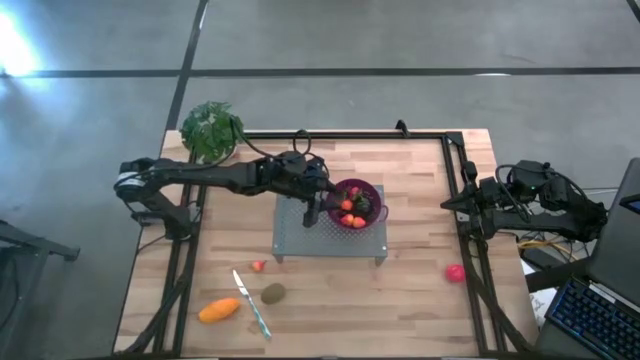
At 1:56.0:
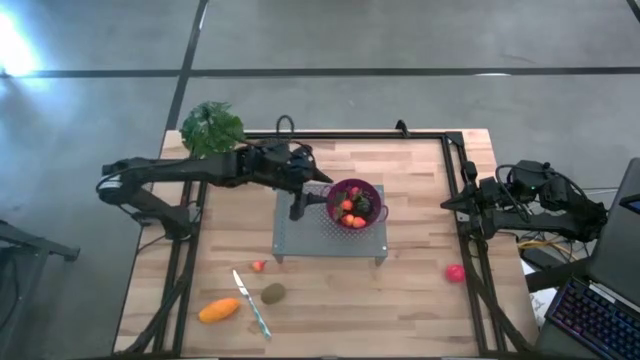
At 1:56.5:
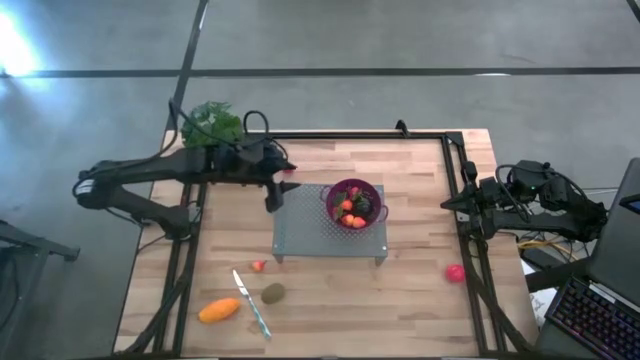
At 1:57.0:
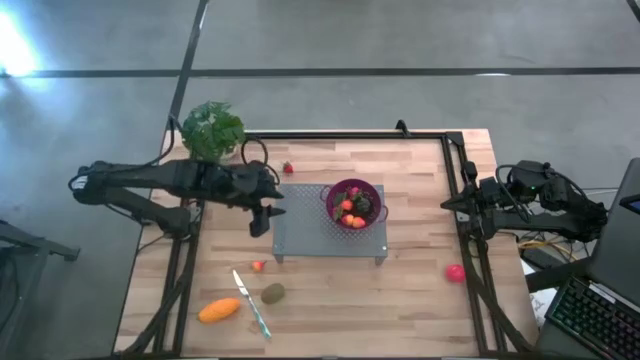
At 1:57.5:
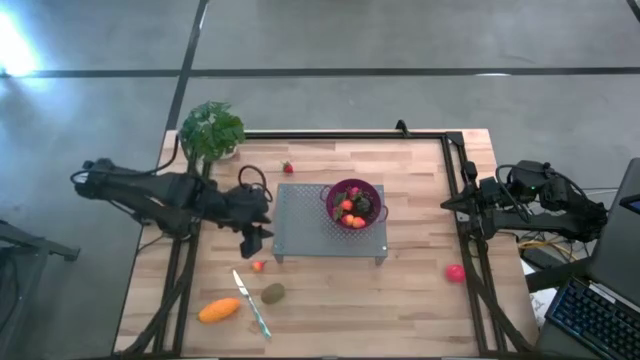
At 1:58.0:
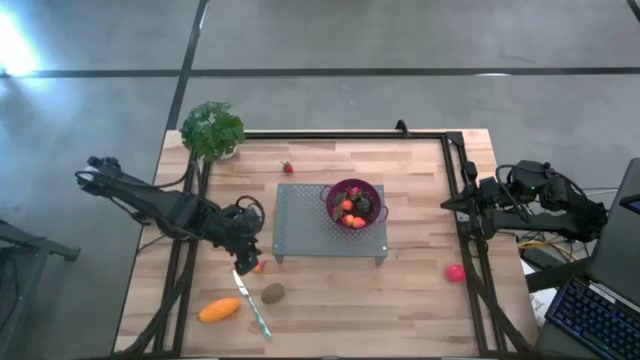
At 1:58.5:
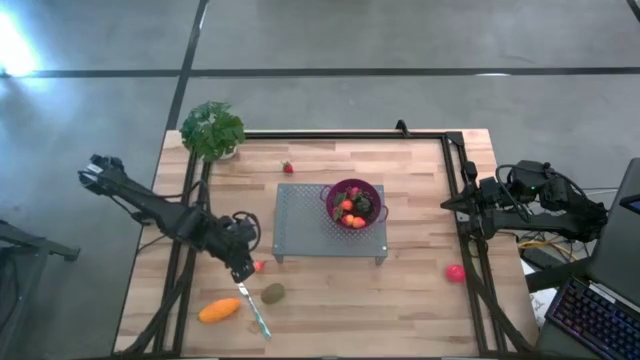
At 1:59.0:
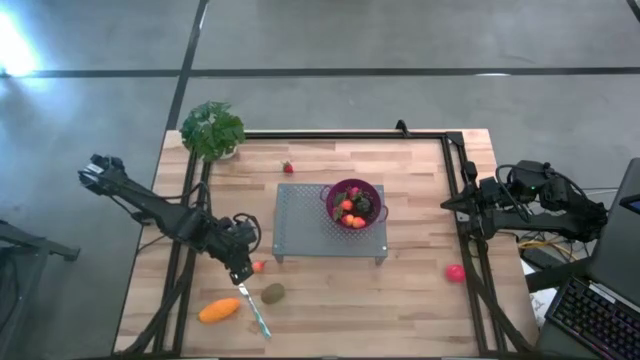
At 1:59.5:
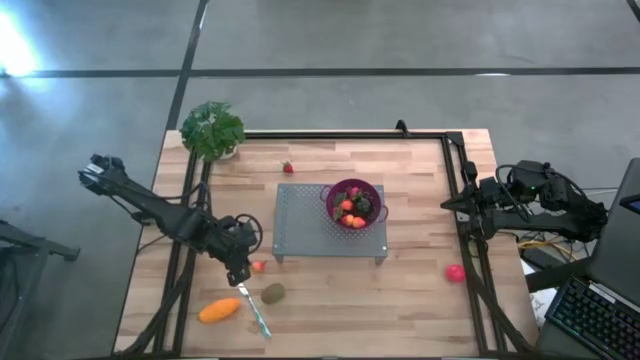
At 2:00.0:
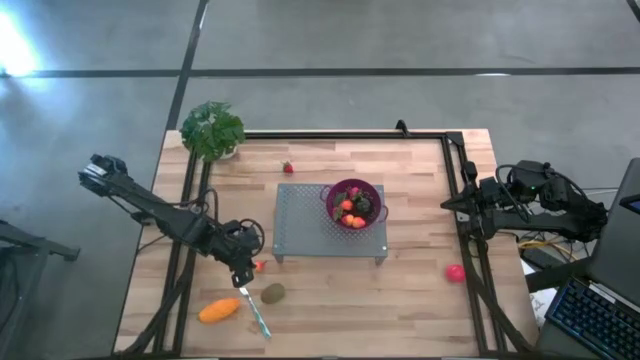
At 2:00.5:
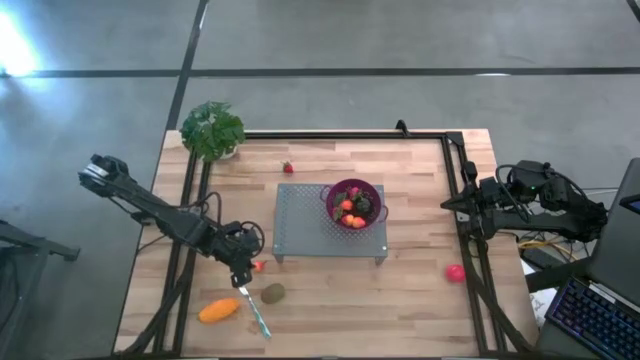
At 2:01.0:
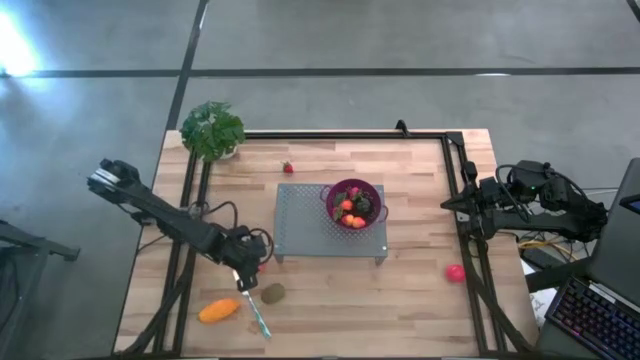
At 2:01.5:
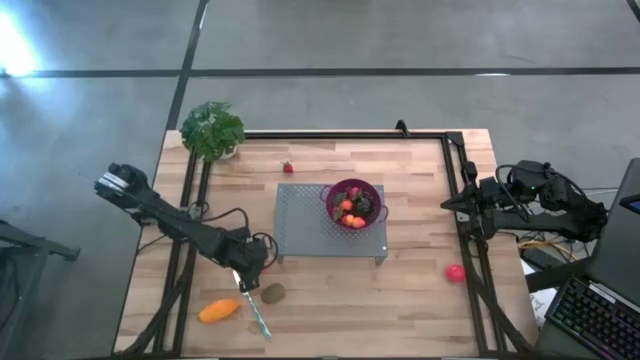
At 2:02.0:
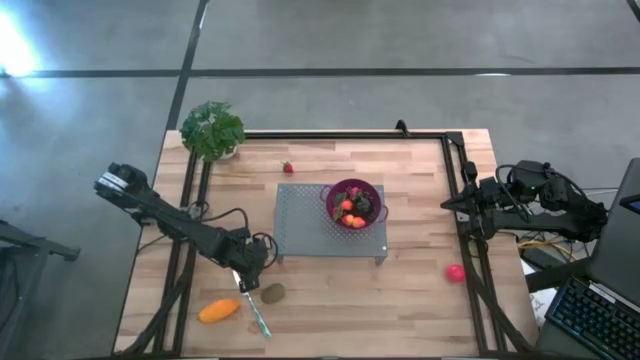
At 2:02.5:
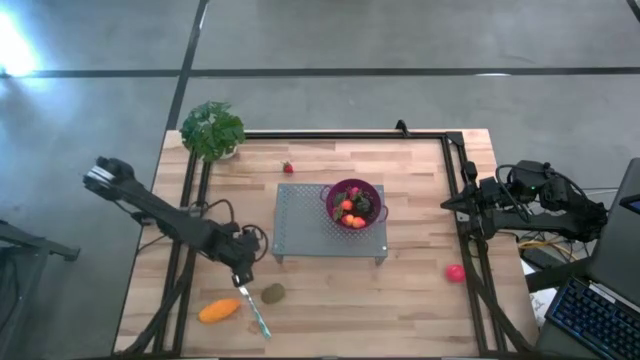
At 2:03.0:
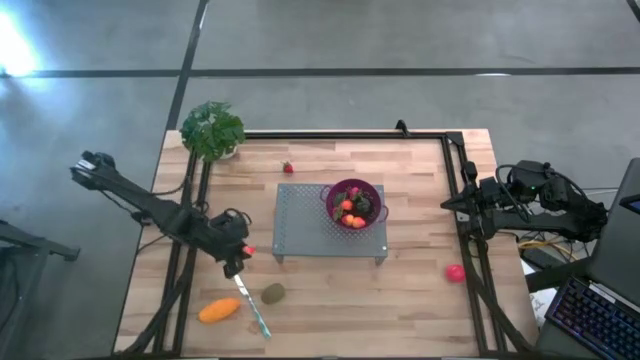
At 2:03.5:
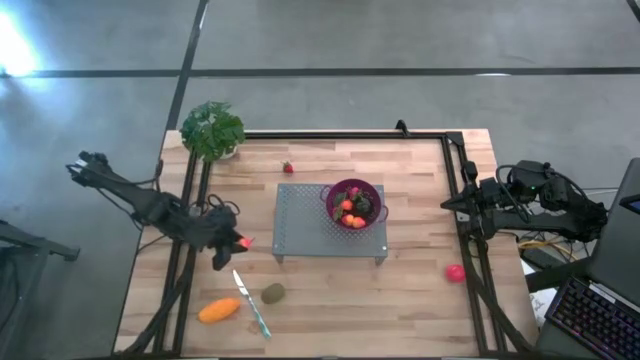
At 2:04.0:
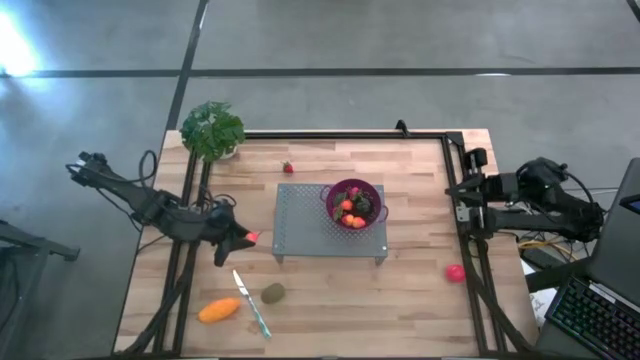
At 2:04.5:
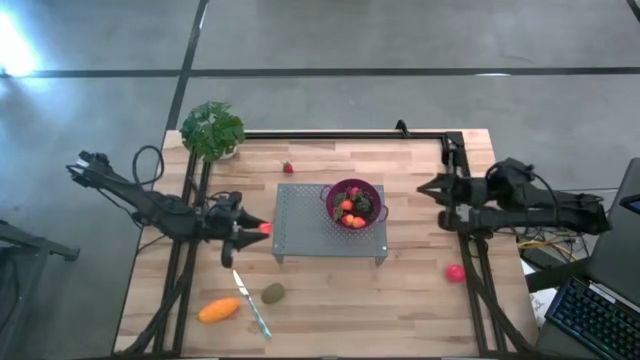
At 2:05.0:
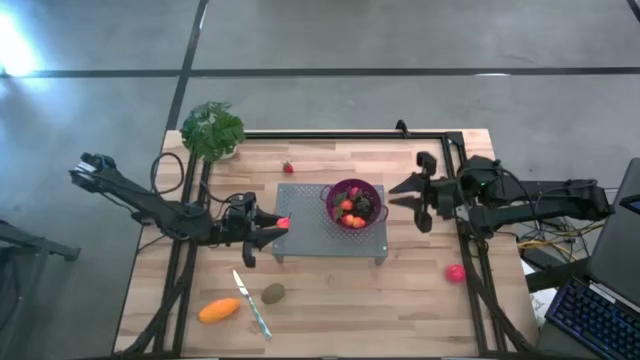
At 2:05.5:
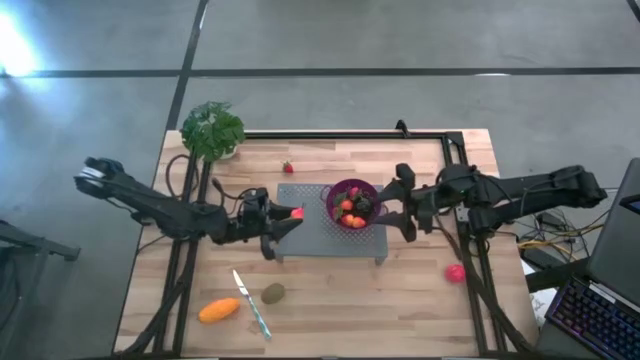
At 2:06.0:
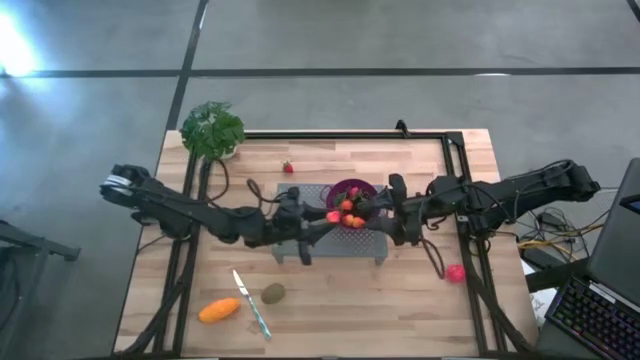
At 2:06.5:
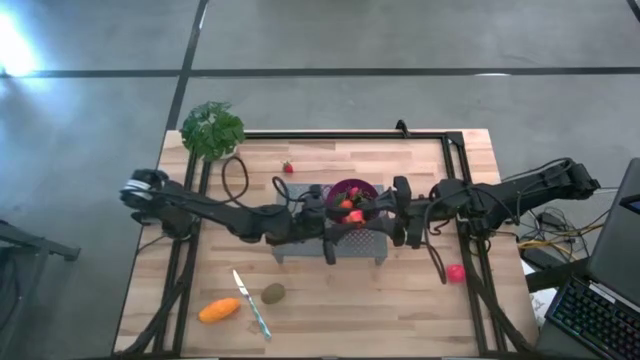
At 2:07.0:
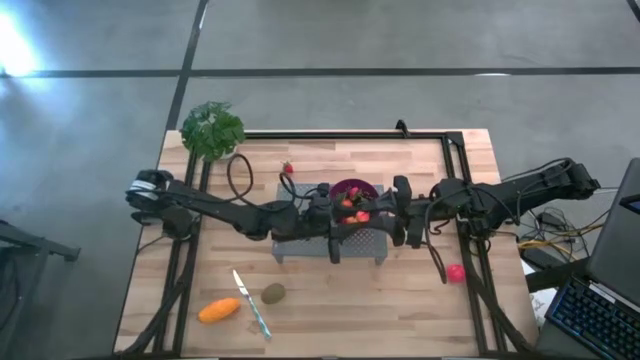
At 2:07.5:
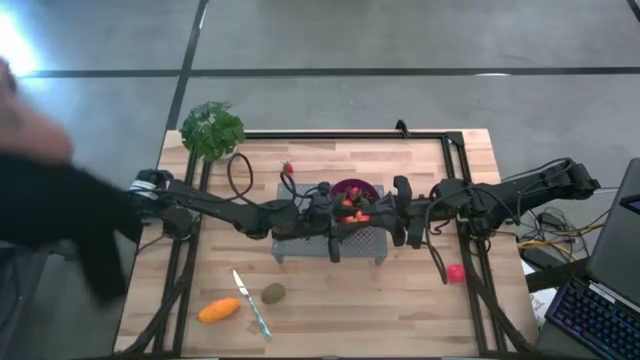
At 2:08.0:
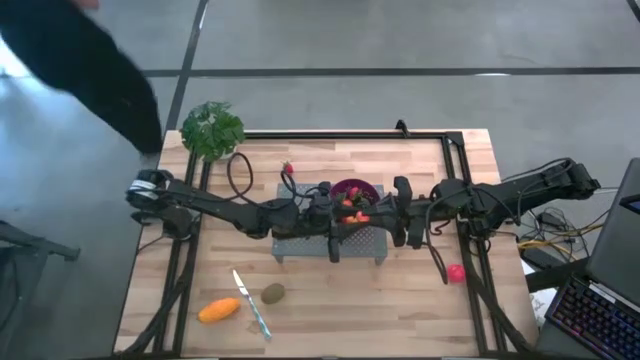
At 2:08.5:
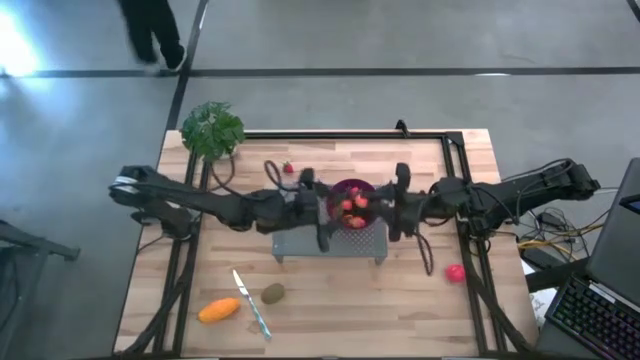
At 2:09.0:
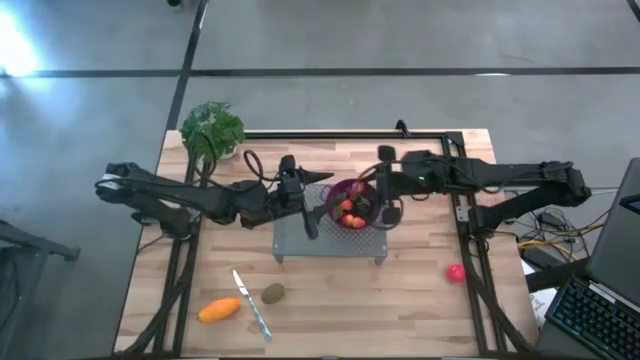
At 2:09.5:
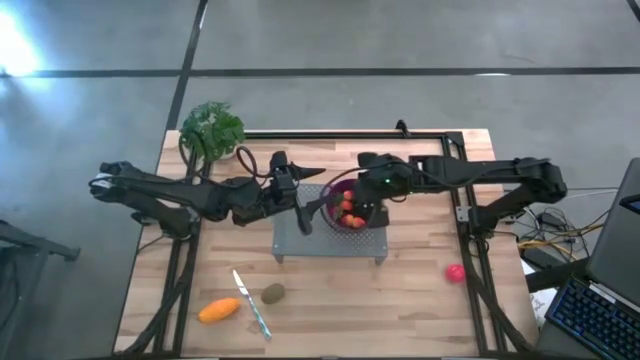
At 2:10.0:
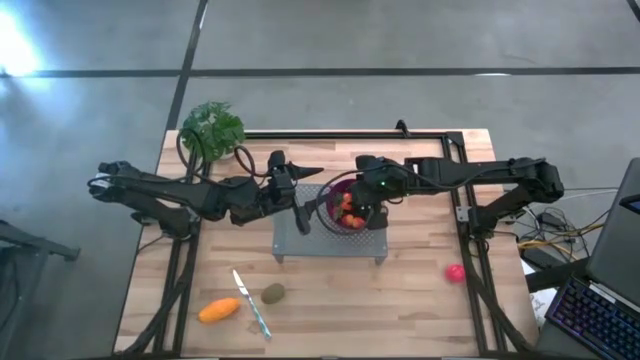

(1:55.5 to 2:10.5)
Task: Pick & Place Fruit
Put the pear in the purple strainer bowl on the shelf

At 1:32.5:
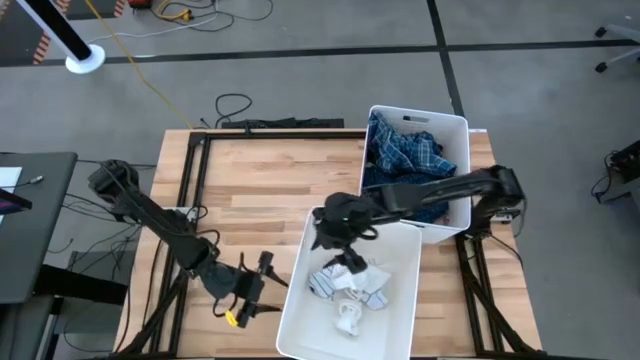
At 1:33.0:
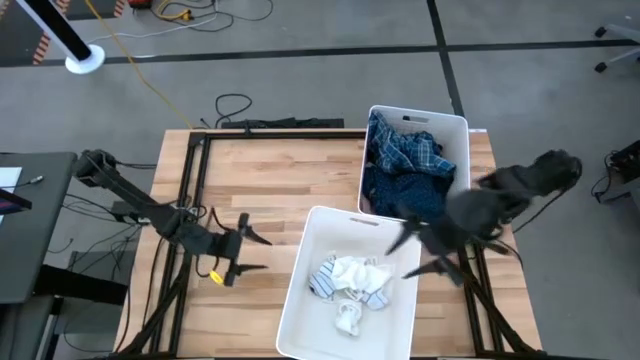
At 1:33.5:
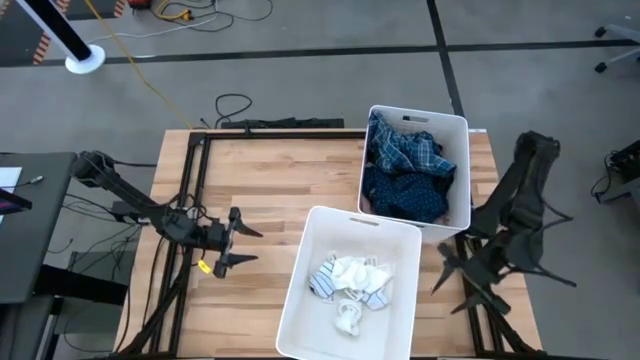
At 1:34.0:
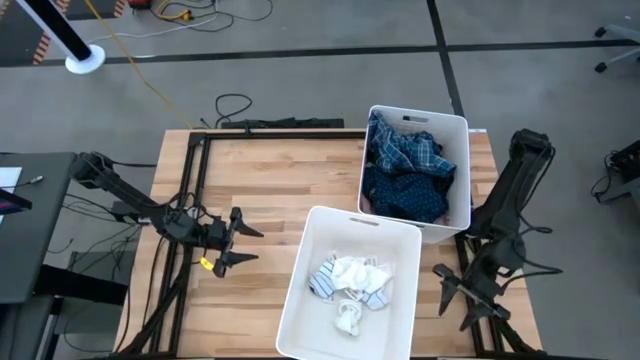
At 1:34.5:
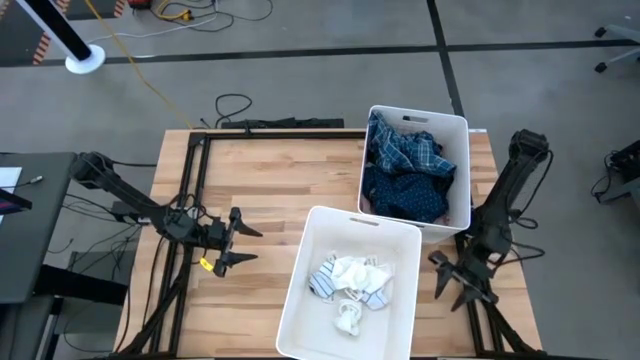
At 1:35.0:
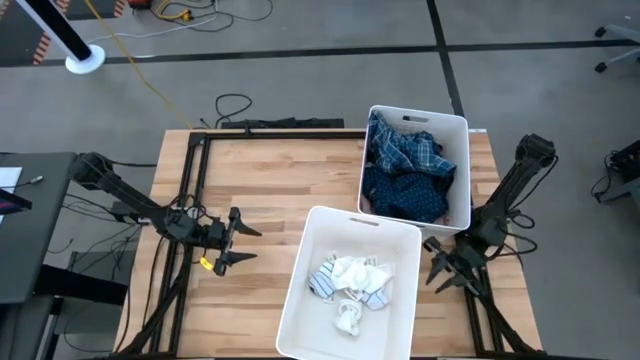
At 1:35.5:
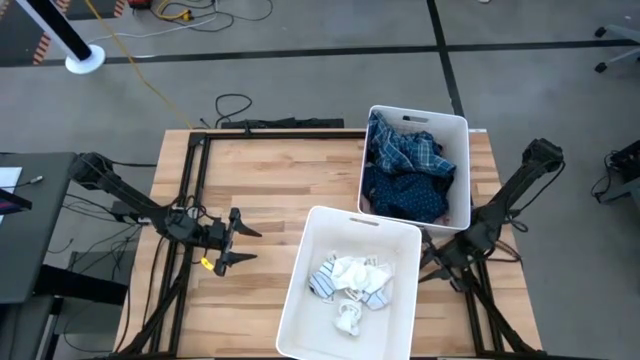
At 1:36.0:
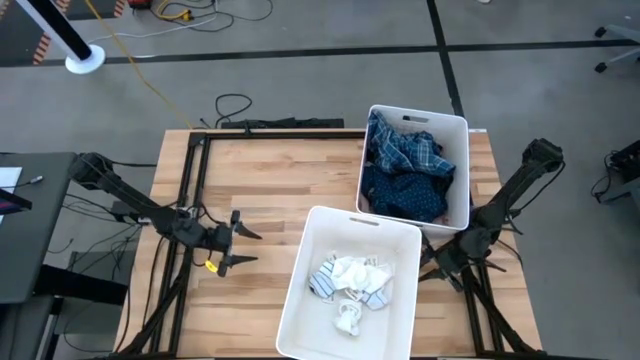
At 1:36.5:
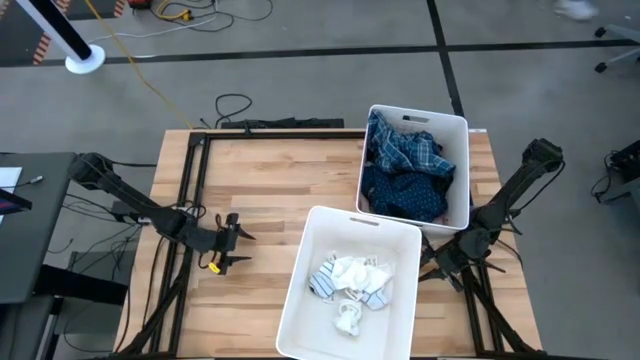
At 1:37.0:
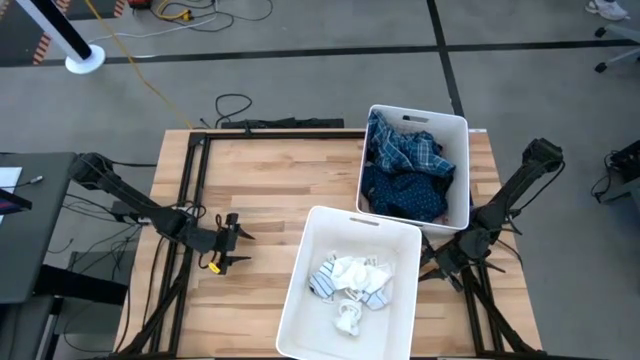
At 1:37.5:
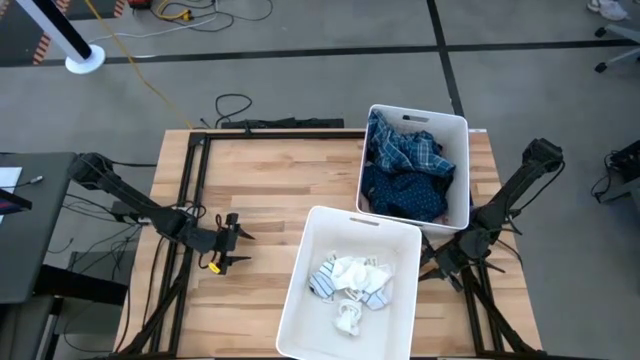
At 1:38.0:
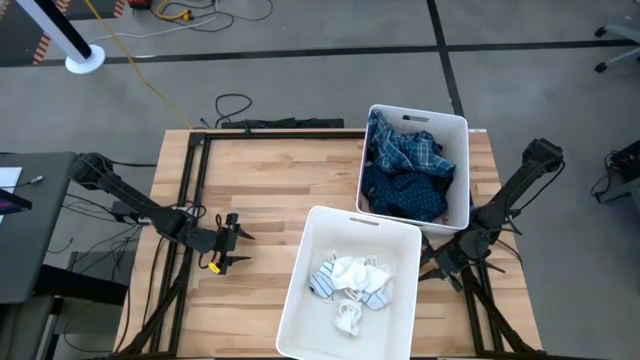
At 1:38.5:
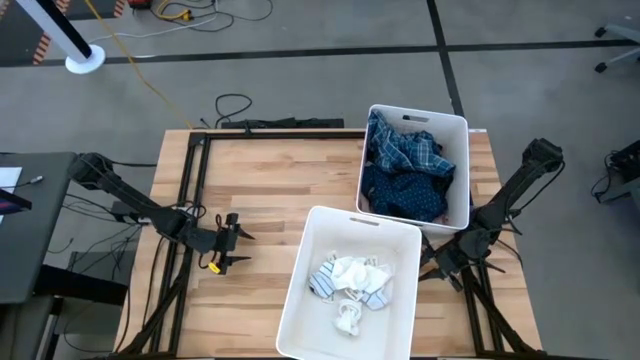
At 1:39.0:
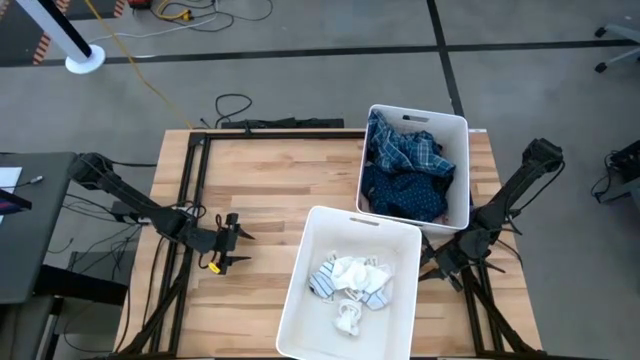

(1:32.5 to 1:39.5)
Task: Sort clothes
Return to Home Position
